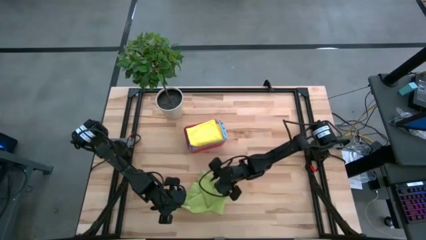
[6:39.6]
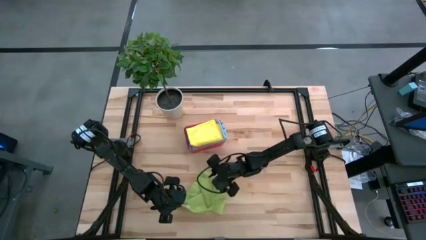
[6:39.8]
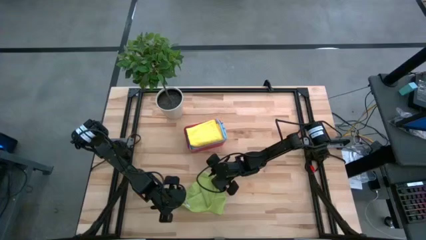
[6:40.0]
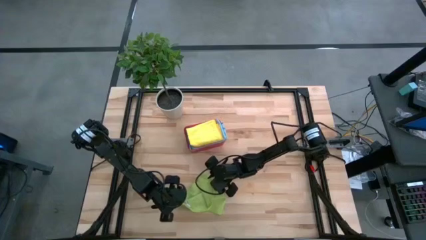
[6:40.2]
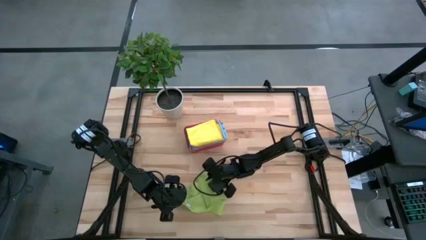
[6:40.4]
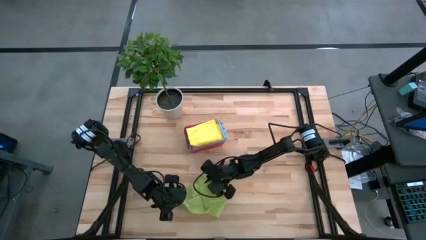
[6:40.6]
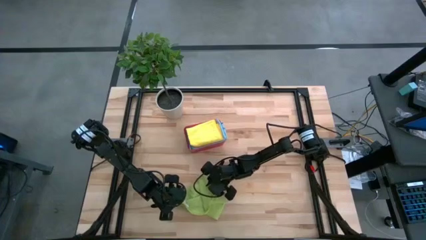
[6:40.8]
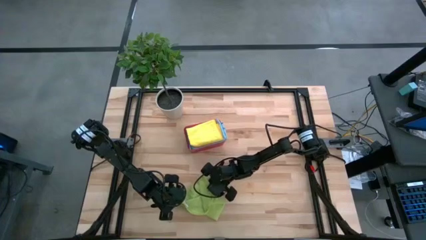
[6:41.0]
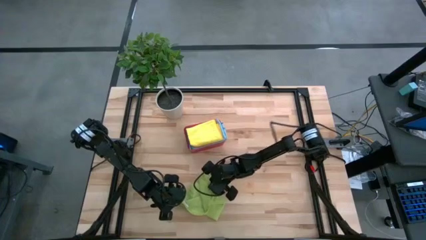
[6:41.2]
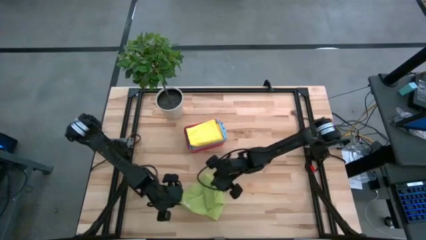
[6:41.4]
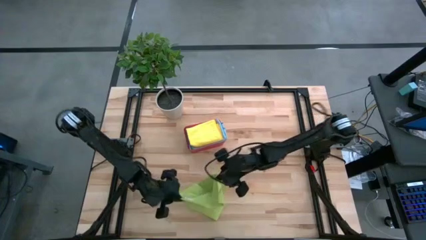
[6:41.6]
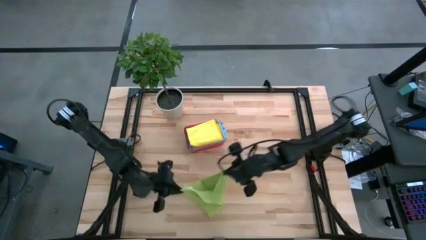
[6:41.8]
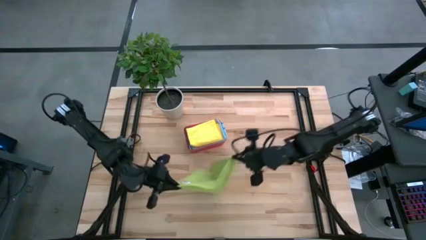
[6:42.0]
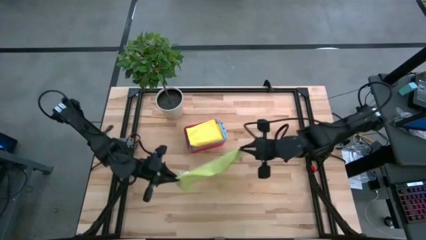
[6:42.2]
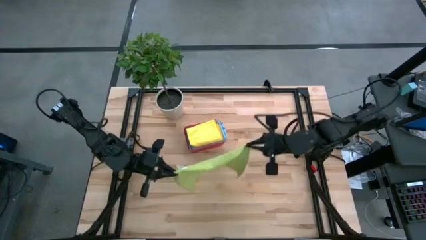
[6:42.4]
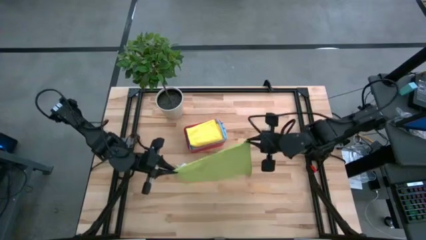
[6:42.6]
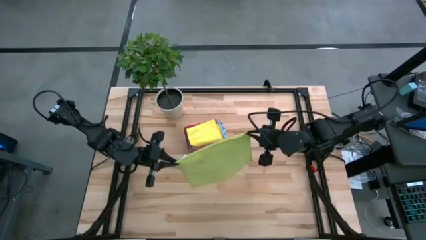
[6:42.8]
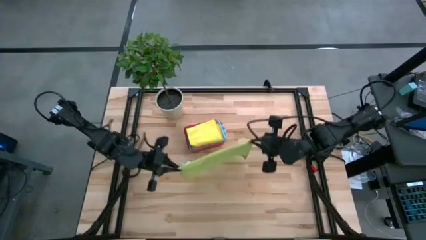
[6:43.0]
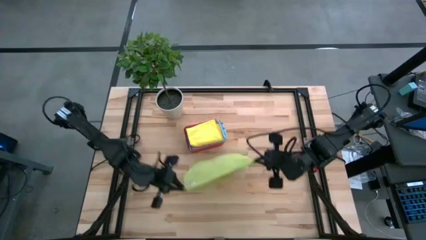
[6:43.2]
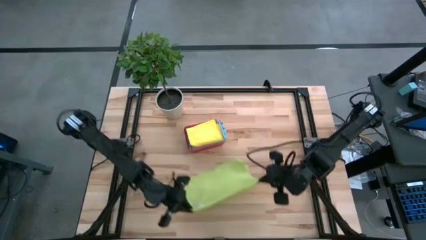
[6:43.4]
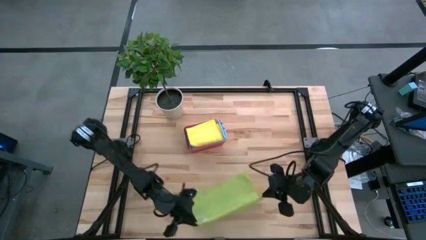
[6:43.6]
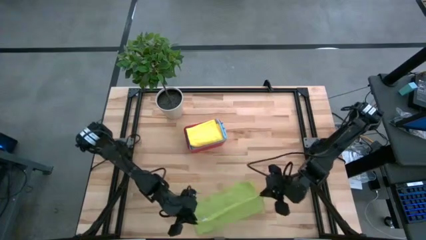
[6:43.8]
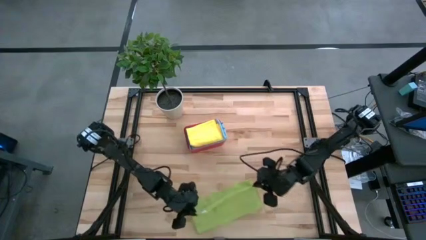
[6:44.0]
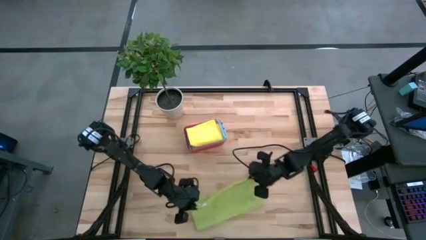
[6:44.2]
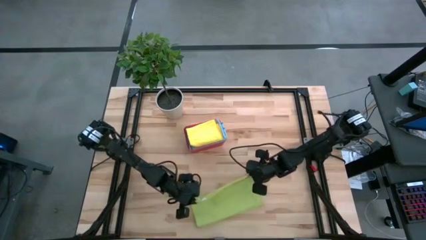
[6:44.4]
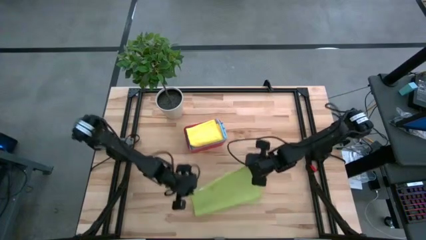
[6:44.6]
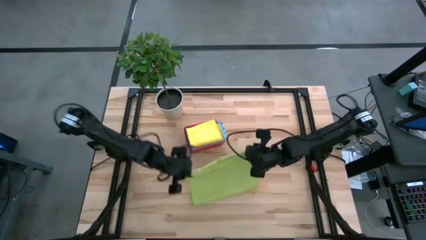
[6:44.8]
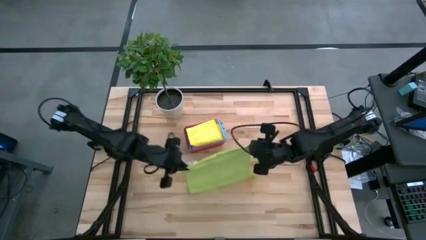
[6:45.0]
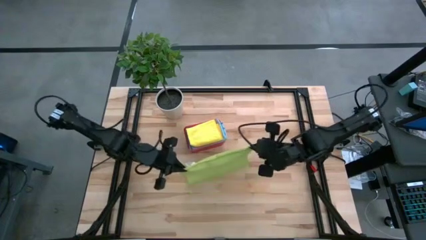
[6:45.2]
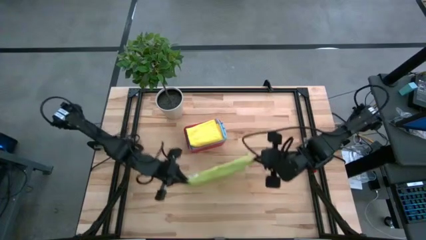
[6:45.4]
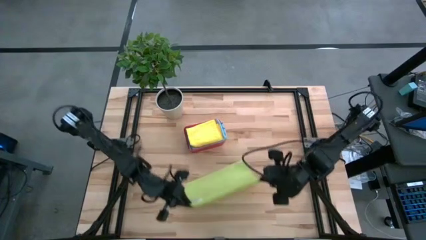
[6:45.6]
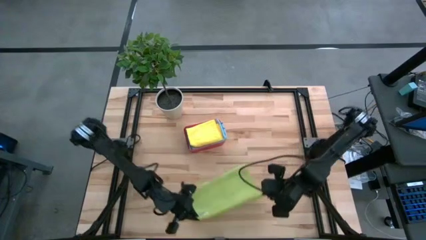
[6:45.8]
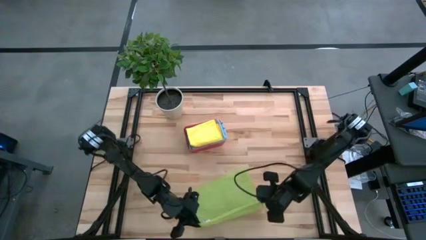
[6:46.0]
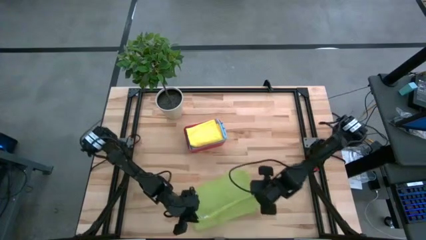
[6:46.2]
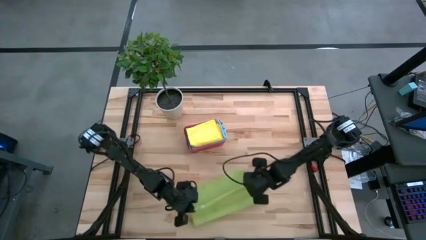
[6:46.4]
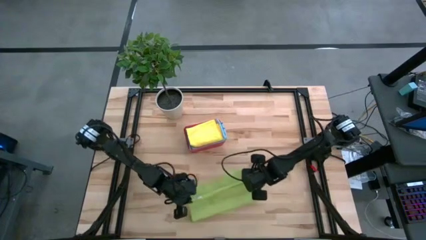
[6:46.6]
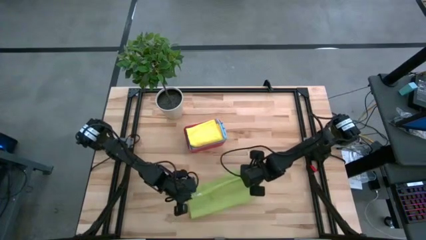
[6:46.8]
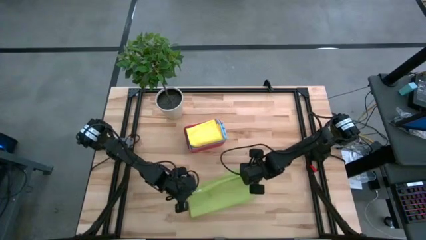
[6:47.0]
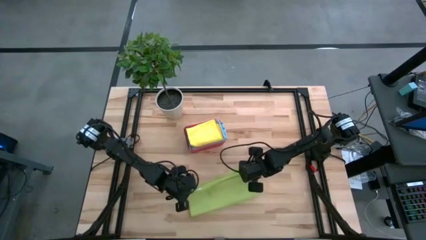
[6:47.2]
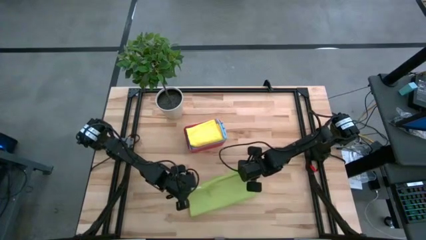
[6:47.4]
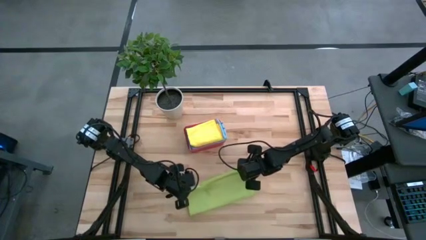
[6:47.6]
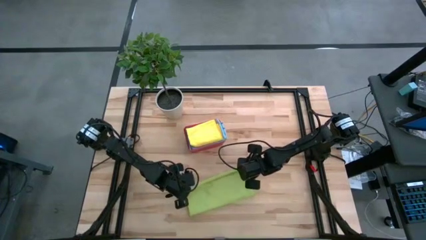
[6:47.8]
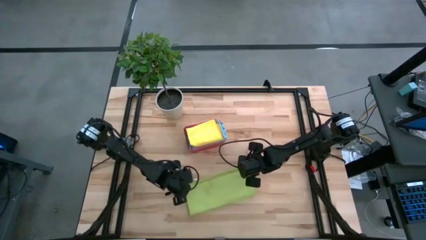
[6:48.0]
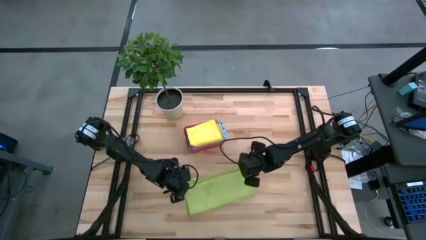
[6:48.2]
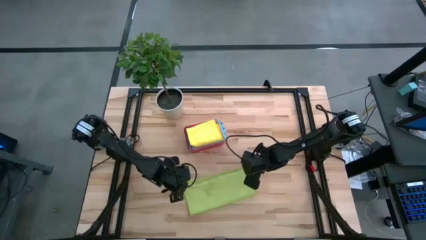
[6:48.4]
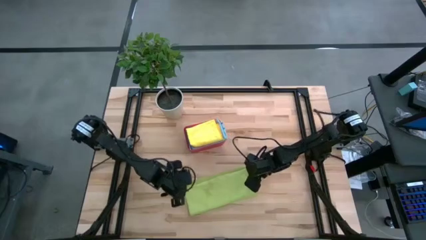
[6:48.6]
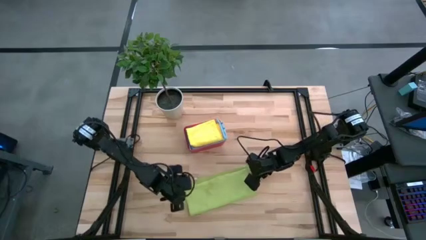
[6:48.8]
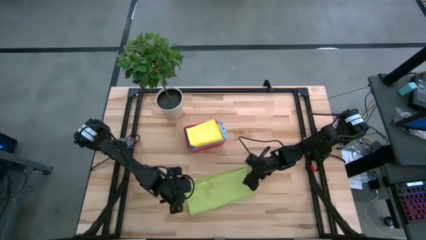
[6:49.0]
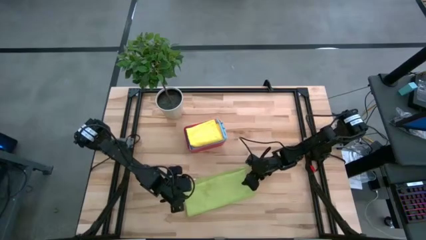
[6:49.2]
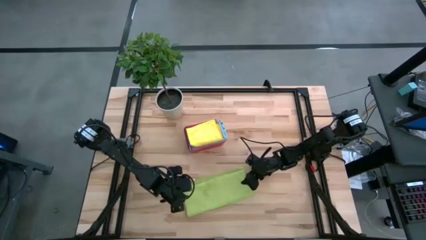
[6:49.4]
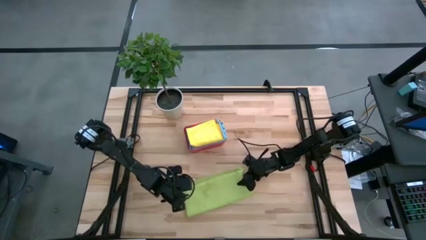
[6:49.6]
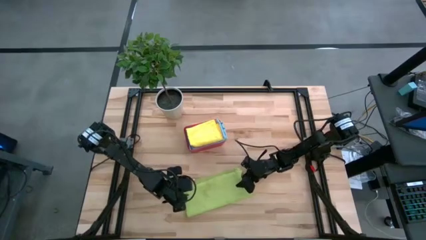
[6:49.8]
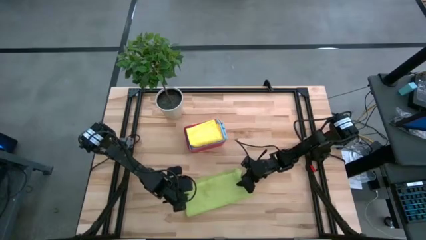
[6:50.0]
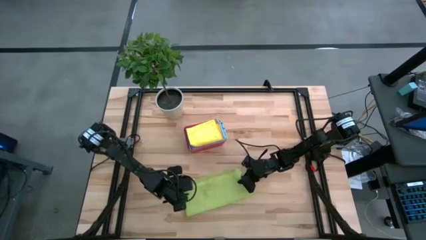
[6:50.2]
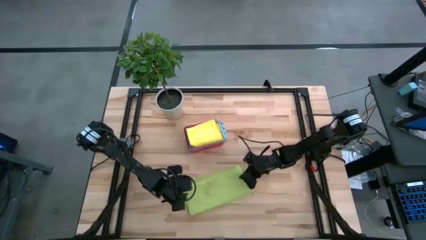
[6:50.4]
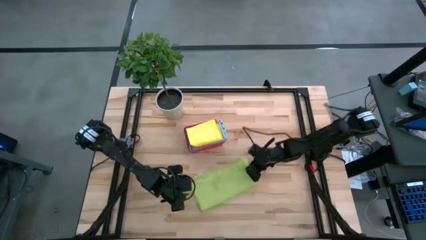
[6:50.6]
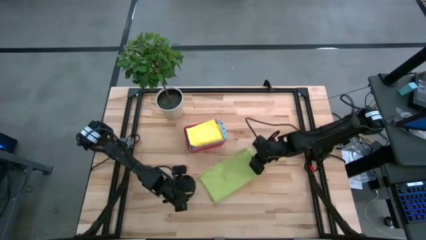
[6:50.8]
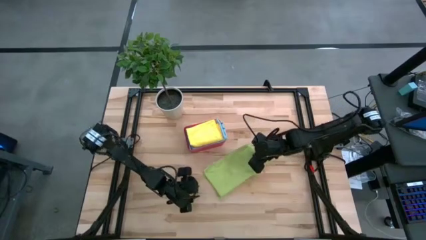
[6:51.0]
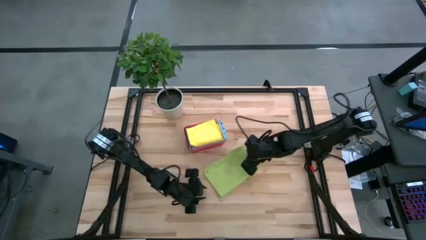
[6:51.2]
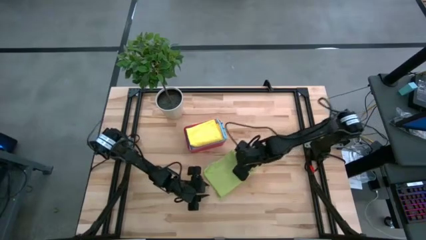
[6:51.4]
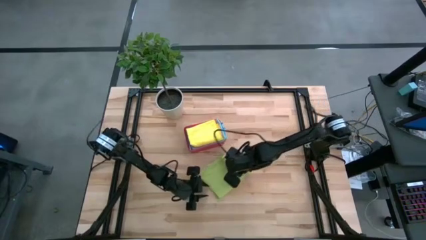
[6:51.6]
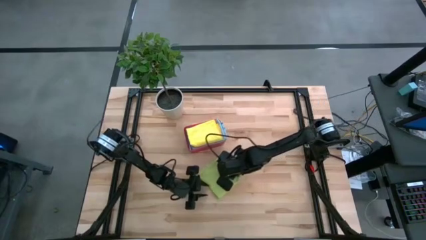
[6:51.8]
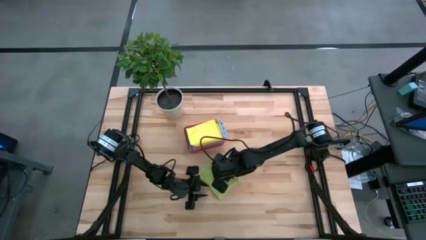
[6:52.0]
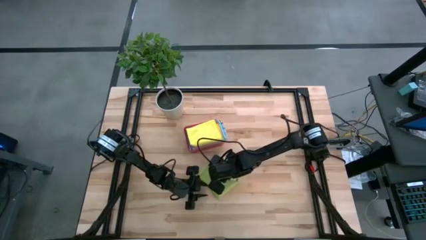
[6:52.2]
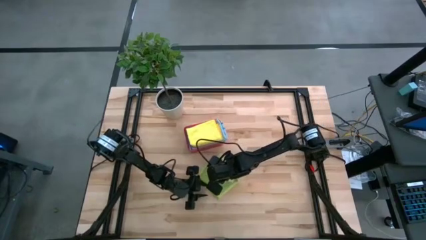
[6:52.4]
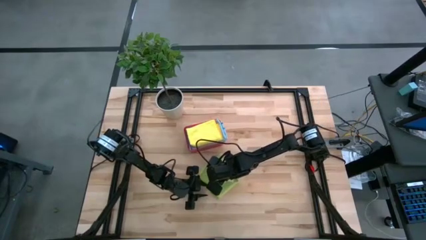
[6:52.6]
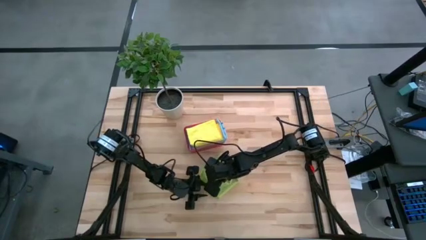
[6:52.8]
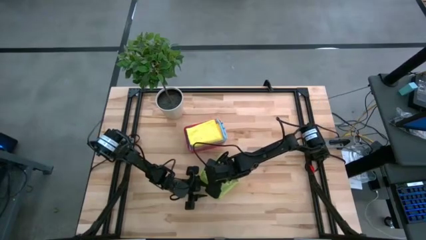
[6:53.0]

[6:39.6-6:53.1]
Task: Fold microfiber towels
Fold the green microfiber cloth

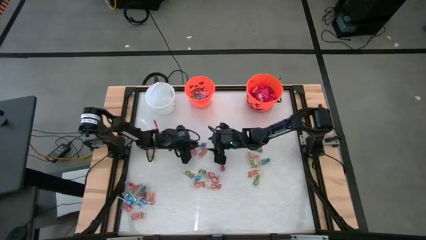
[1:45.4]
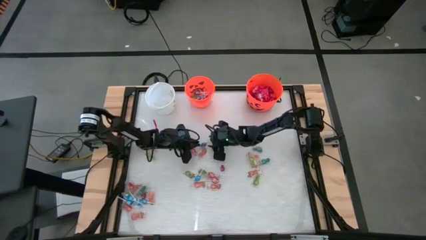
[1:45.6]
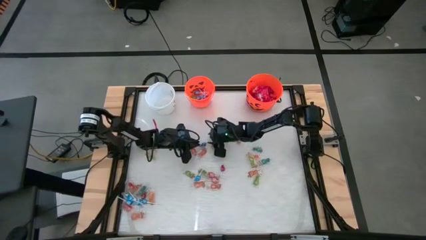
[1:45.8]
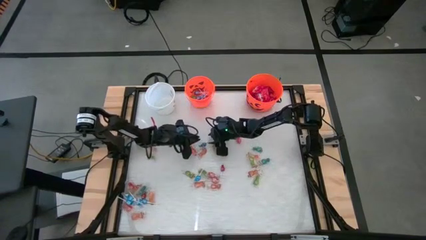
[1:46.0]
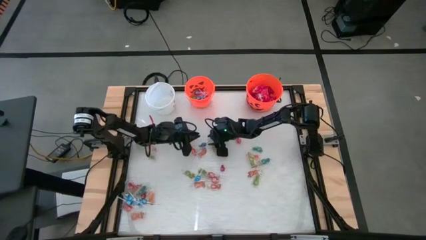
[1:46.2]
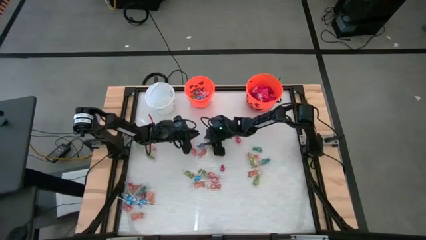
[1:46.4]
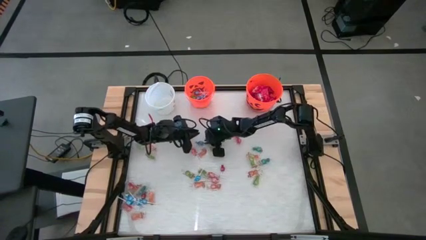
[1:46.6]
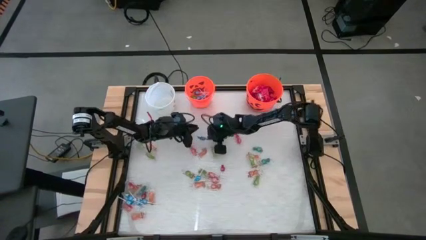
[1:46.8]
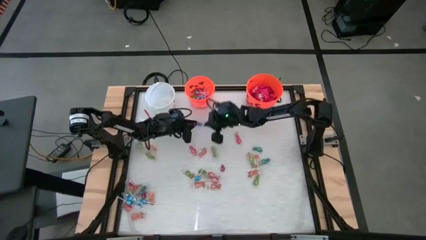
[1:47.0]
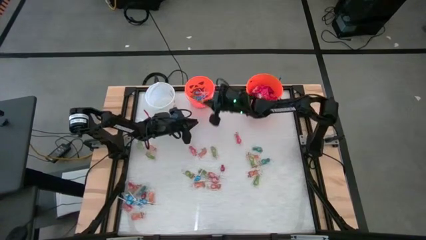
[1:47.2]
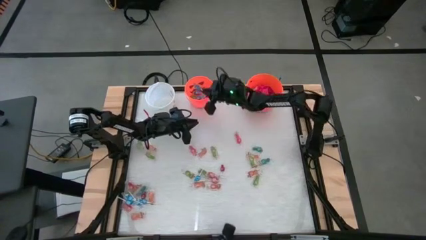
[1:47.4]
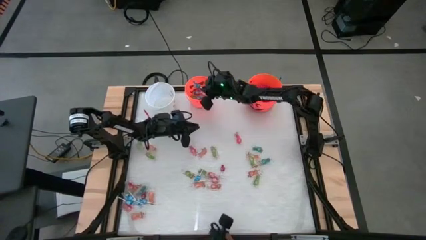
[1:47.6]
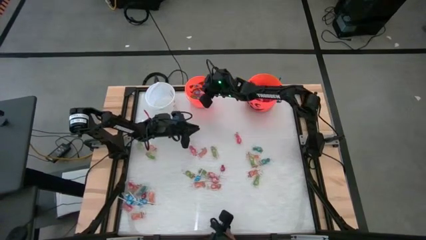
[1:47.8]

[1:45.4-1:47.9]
Task: Sort candy by brand, put in halloween buckets
Put the blue lollipop into the left orange bucket
